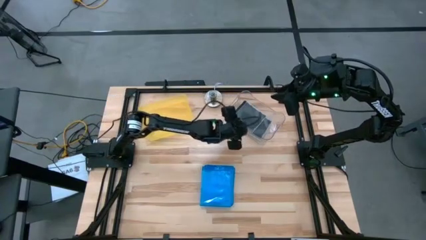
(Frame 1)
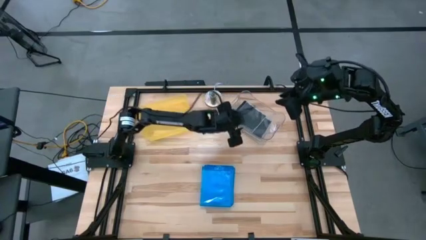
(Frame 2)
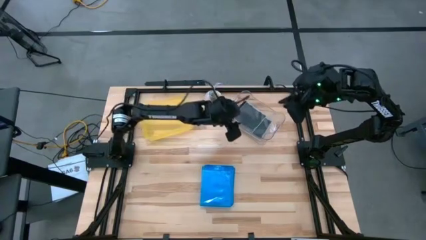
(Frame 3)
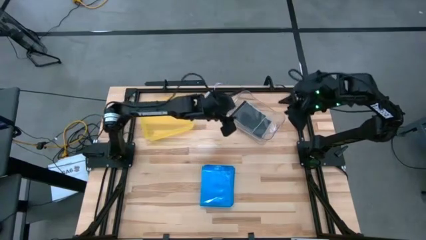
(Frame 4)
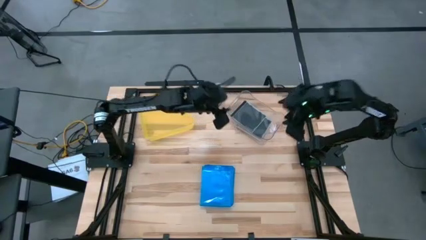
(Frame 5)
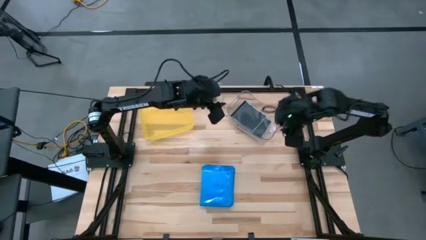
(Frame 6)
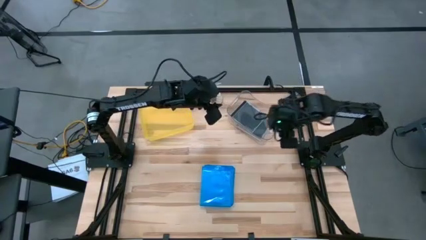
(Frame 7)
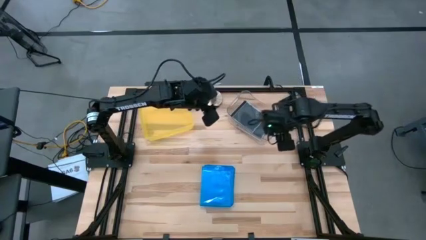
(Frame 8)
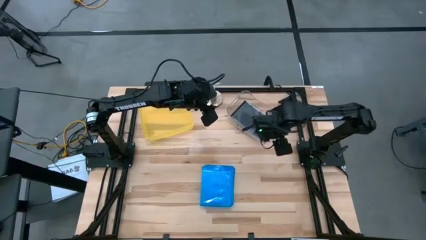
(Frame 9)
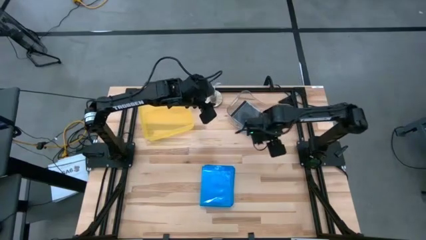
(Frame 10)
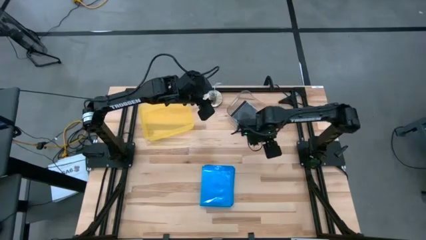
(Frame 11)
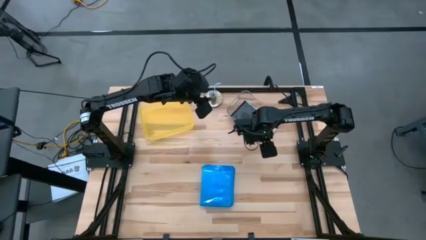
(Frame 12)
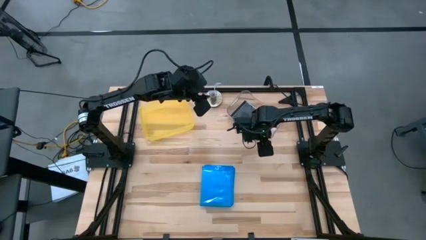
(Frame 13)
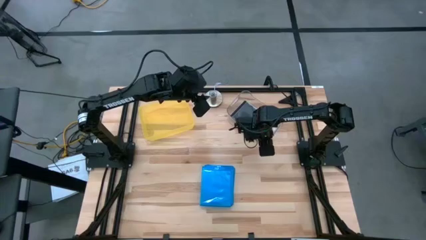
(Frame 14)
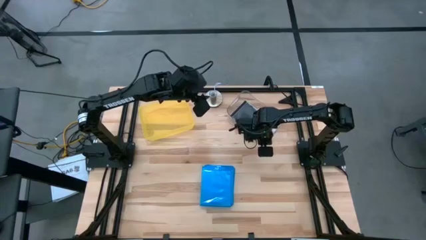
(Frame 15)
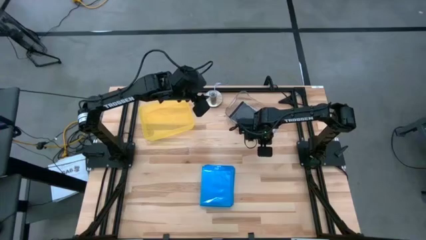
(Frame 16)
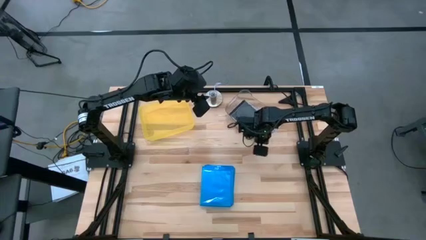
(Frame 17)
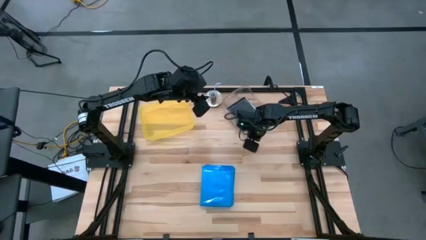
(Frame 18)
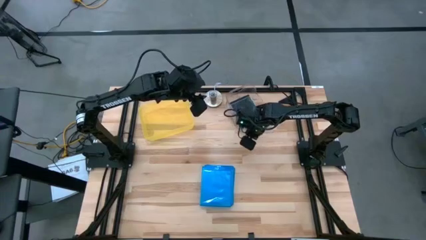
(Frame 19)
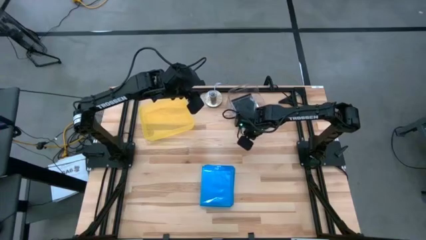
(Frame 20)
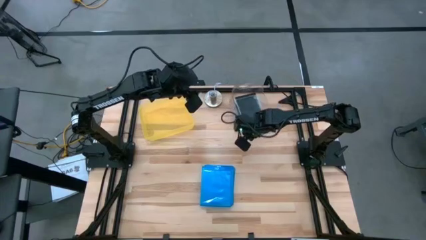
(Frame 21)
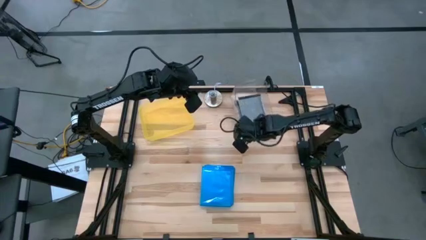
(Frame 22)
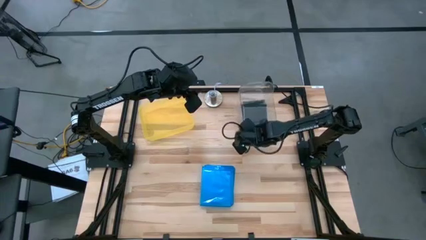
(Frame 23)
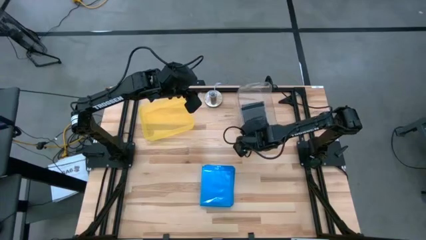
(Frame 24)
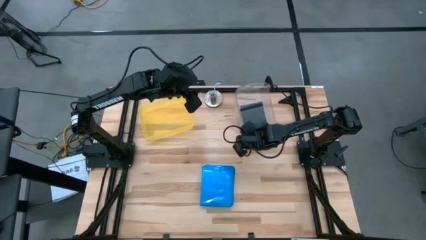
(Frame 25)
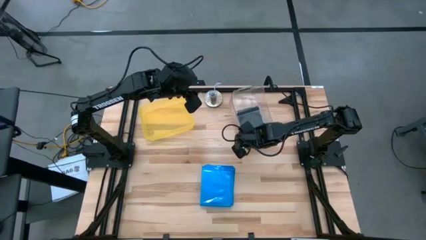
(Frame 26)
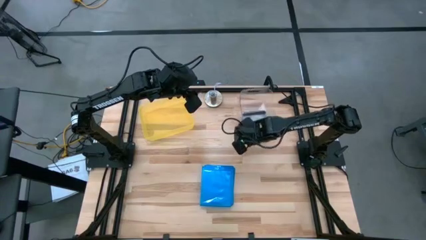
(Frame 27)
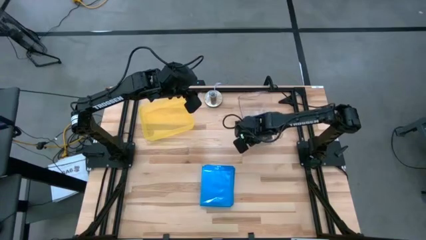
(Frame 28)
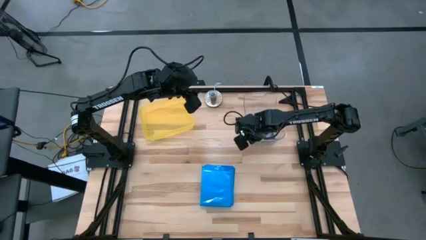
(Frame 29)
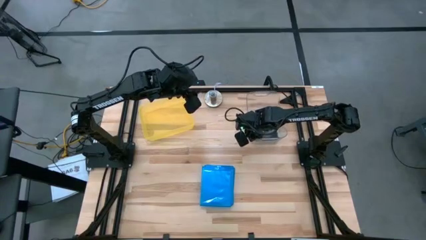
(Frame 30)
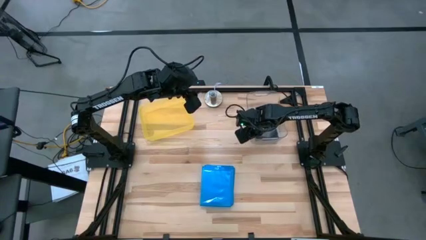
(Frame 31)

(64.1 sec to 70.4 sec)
Task: Pick & place jewel cases by type
Adjust the transparent bin on the table

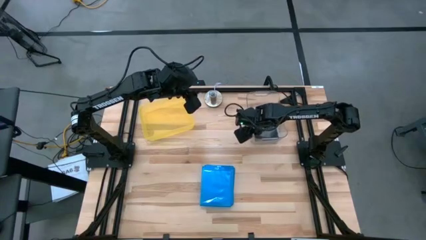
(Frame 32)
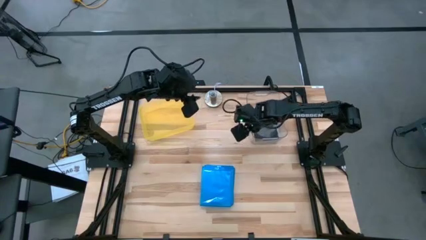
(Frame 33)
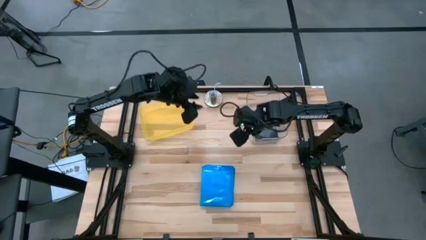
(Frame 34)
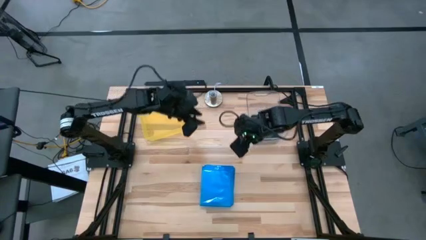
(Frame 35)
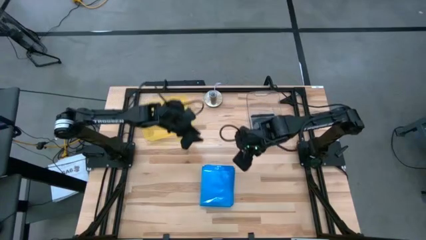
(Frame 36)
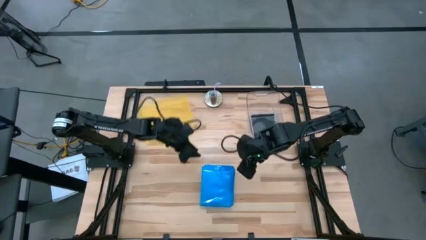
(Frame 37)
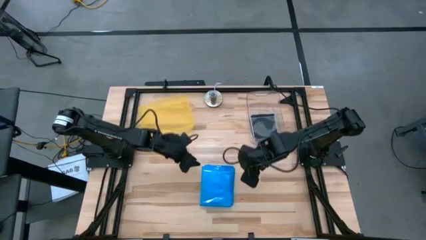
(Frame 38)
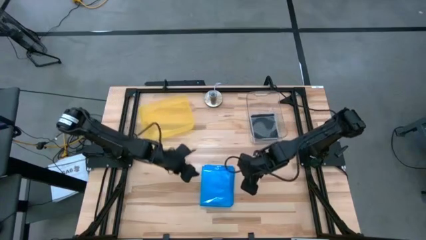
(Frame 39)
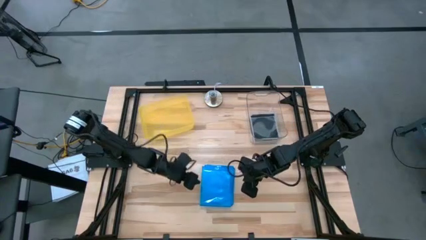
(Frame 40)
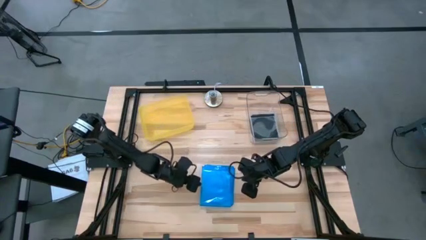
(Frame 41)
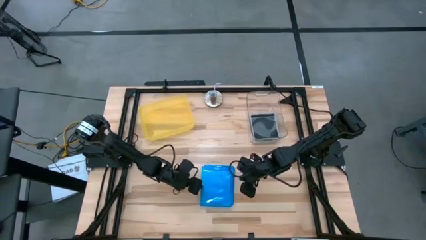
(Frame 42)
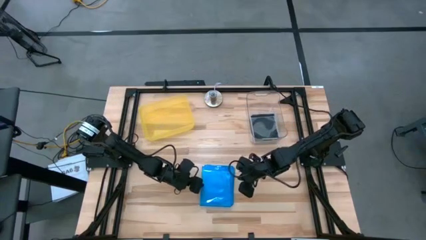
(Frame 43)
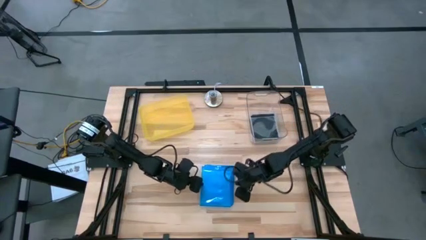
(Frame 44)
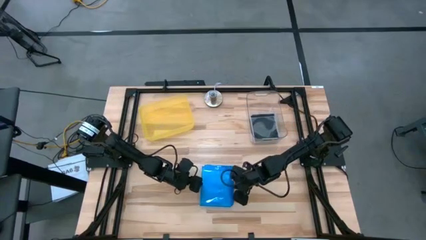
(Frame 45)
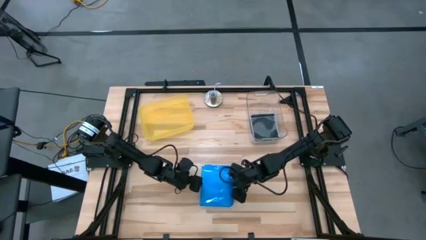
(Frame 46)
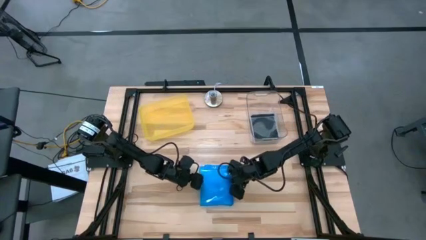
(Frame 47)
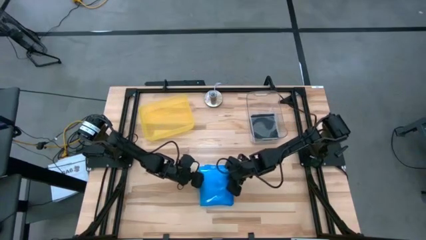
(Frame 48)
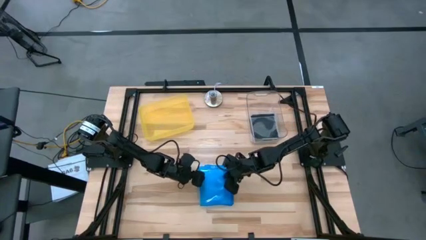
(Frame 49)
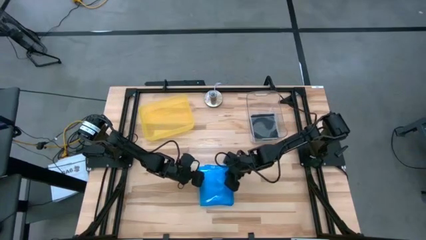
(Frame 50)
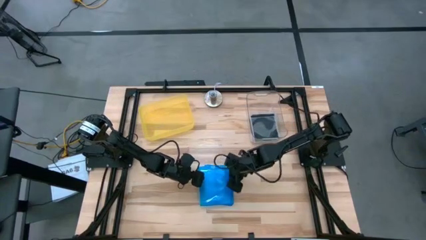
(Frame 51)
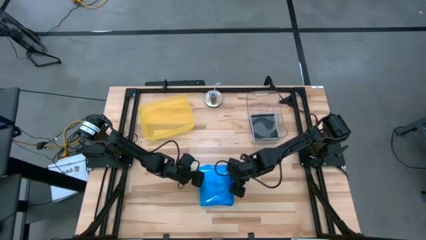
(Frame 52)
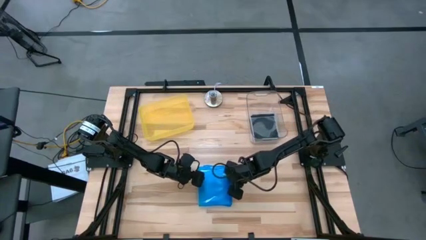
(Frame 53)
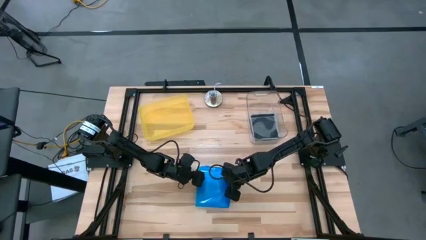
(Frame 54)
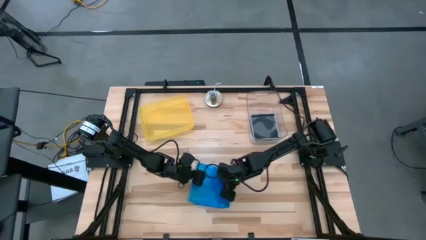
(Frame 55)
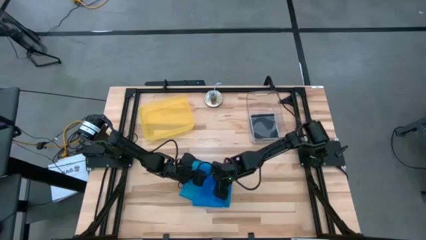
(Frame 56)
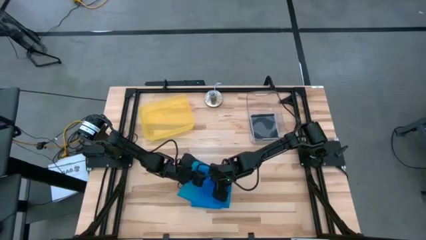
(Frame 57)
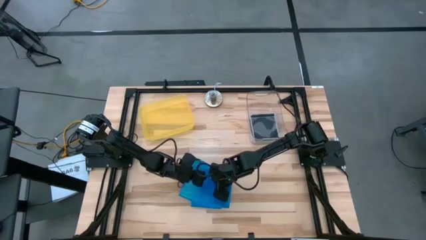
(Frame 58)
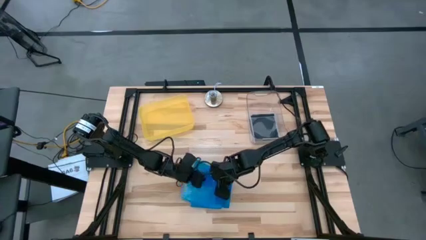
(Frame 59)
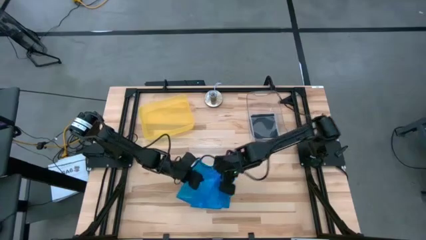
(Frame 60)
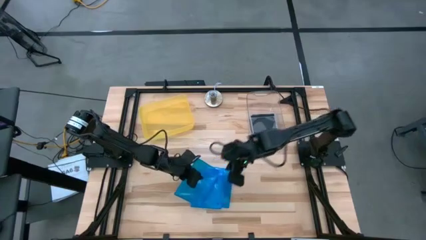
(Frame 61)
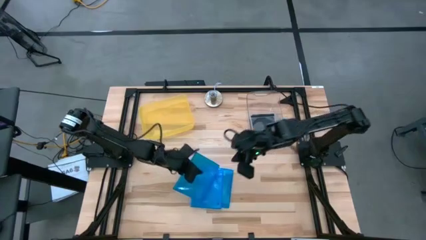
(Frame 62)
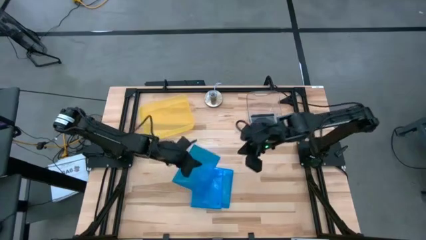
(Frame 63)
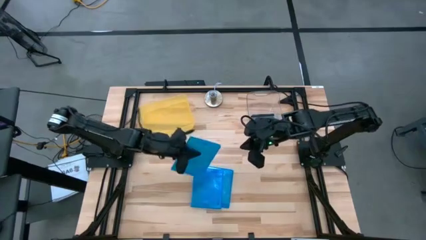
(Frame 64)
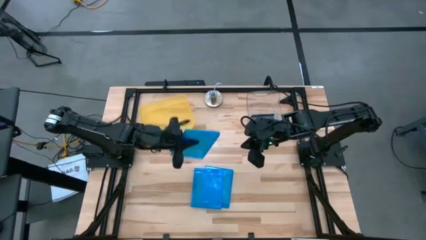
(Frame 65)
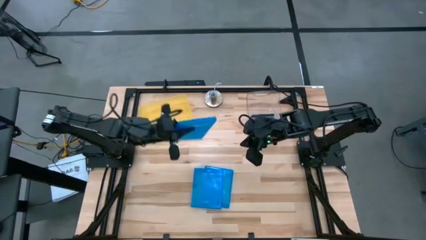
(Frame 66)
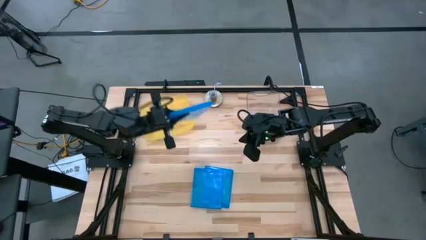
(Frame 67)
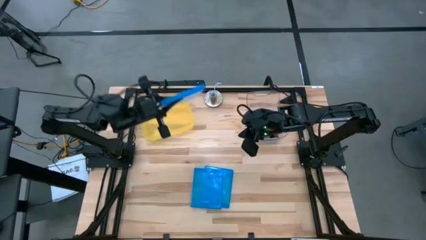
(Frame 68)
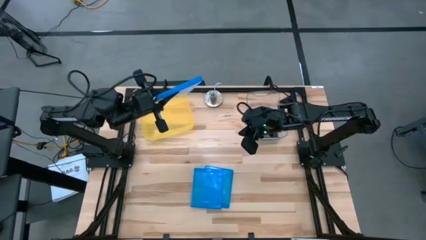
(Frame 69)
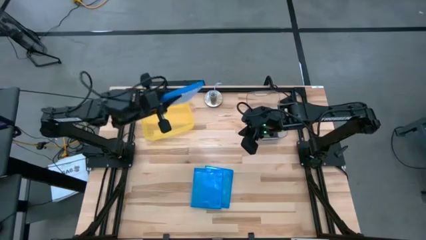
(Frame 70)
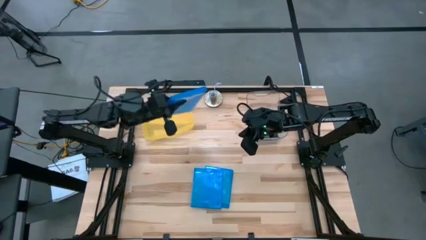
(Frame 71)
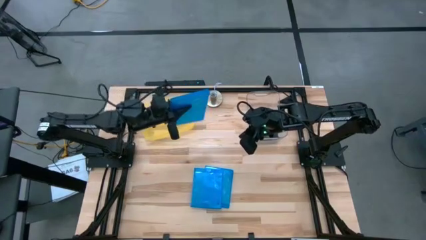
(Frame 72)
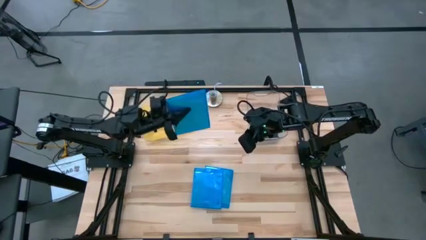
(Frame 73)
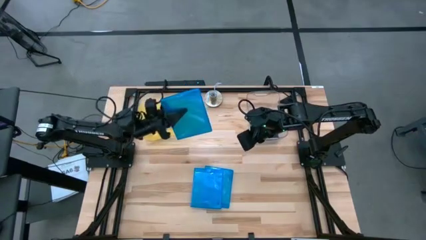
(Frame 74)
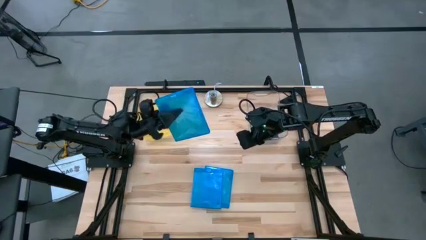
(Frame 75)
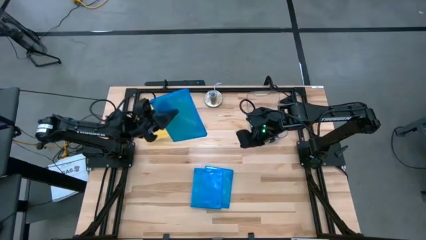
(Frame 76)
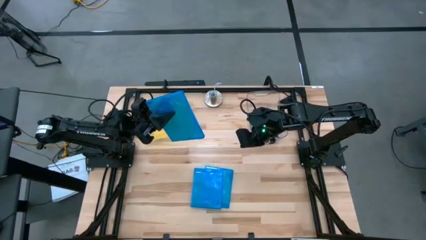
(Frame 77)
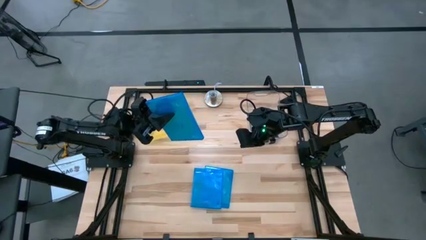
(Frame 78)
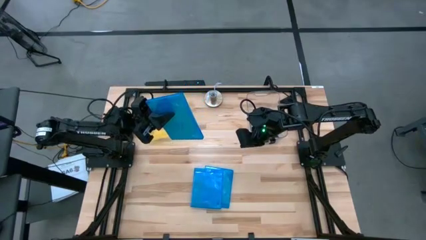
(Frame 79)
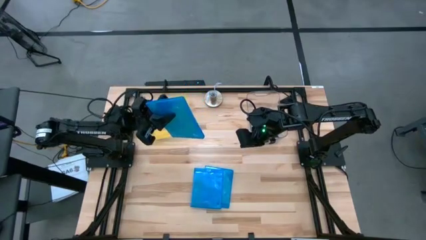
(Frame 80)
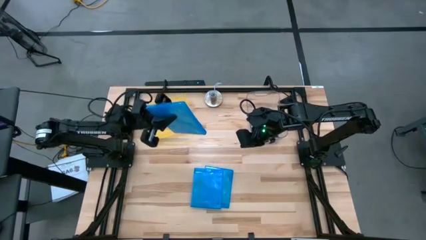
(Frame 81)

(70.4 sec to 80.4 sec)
Put the blue CD case into the yellow bin
